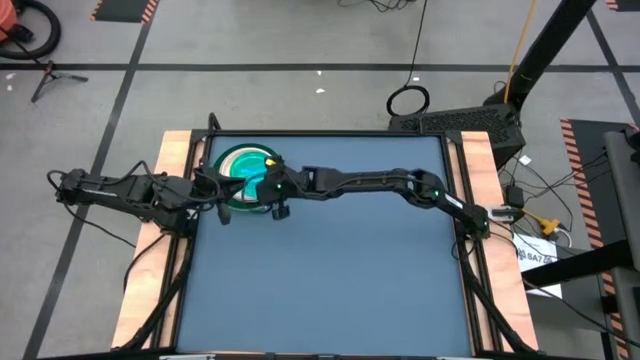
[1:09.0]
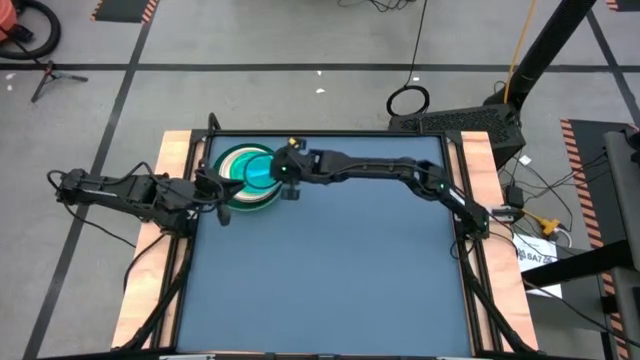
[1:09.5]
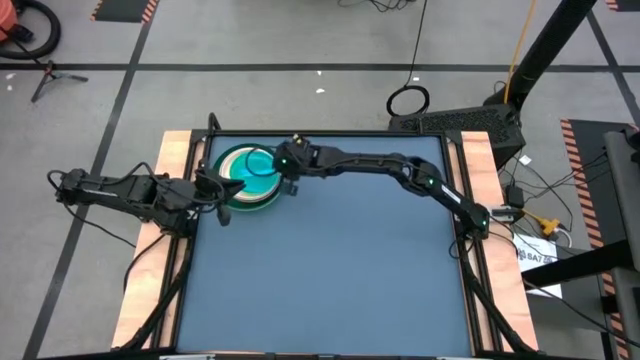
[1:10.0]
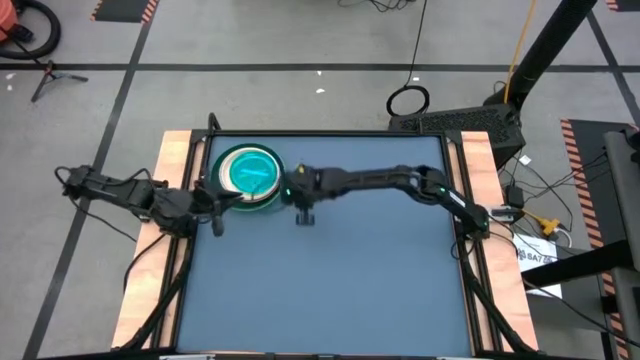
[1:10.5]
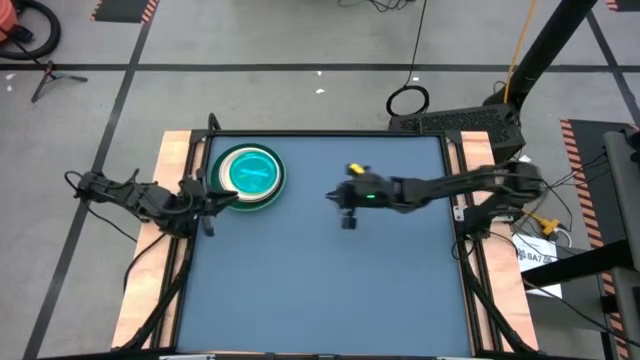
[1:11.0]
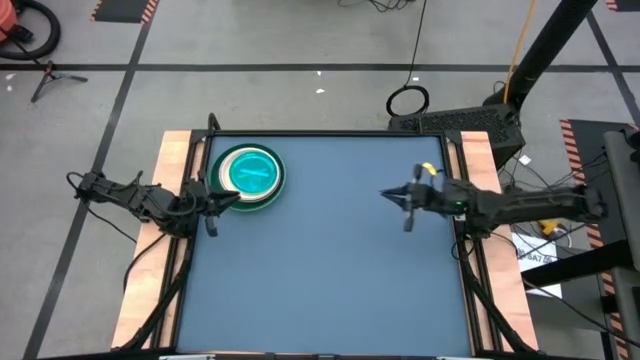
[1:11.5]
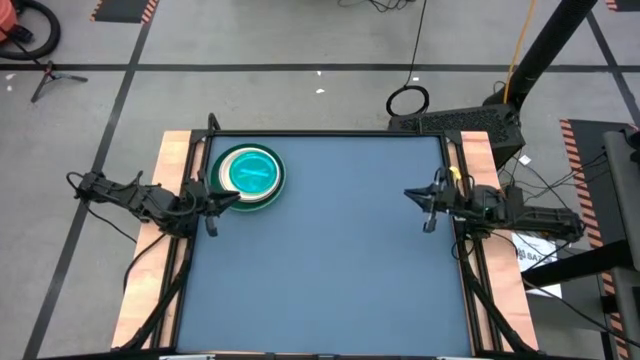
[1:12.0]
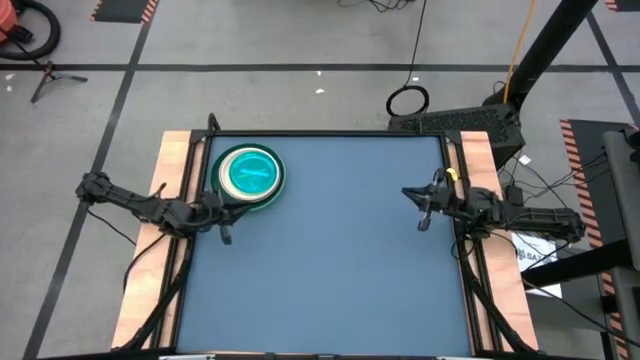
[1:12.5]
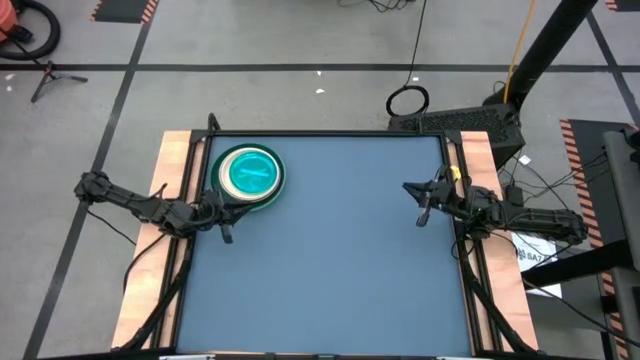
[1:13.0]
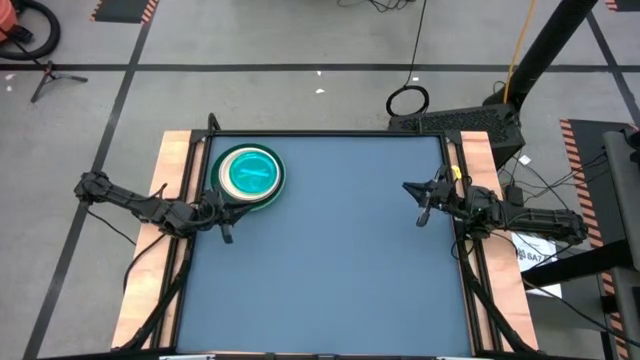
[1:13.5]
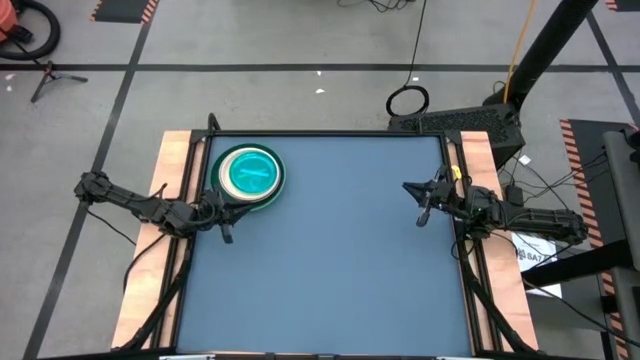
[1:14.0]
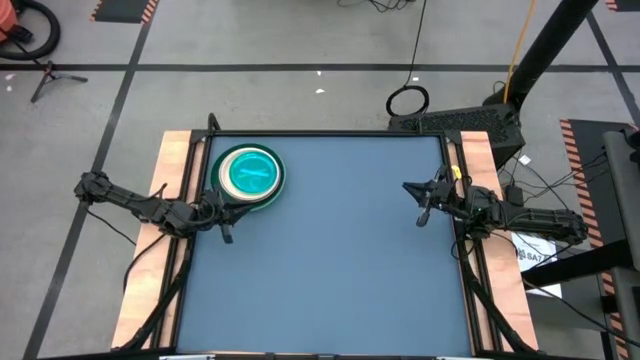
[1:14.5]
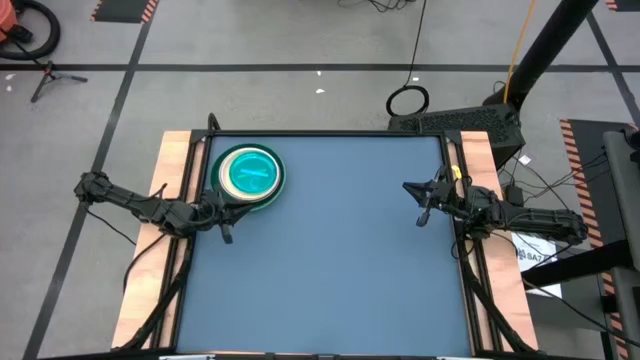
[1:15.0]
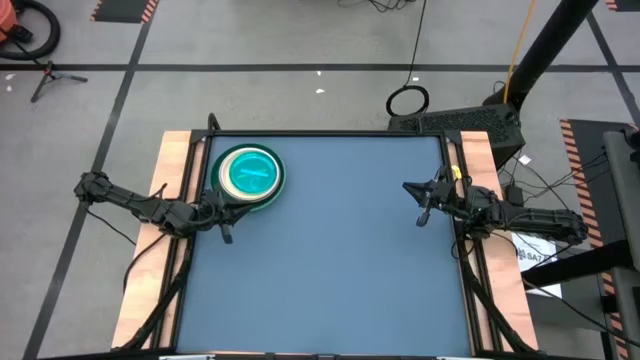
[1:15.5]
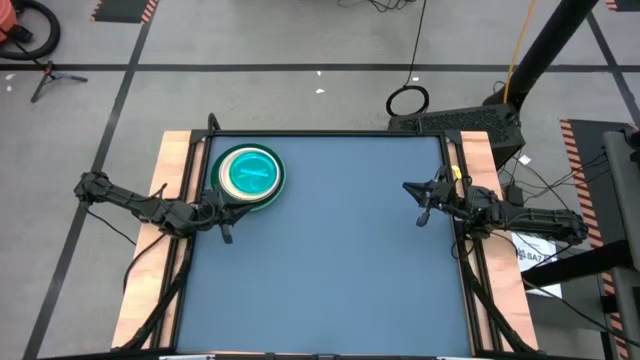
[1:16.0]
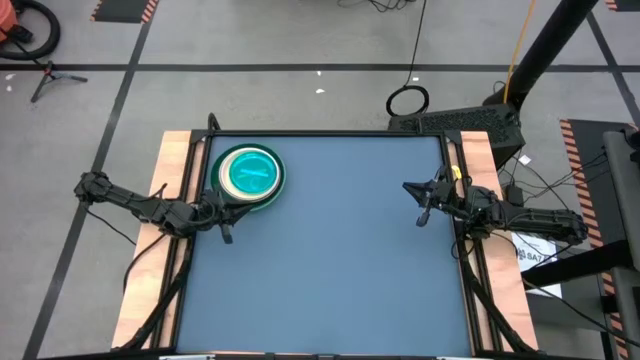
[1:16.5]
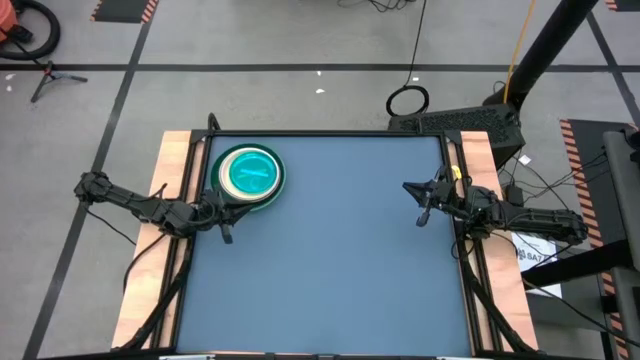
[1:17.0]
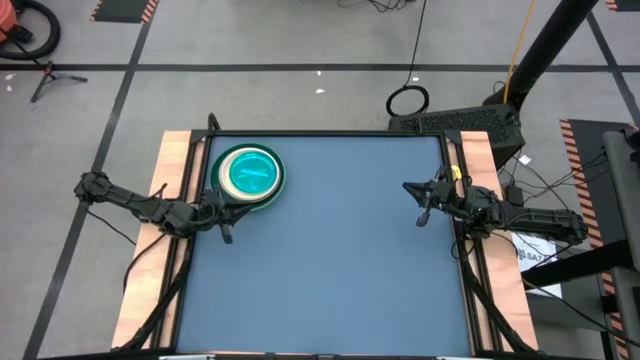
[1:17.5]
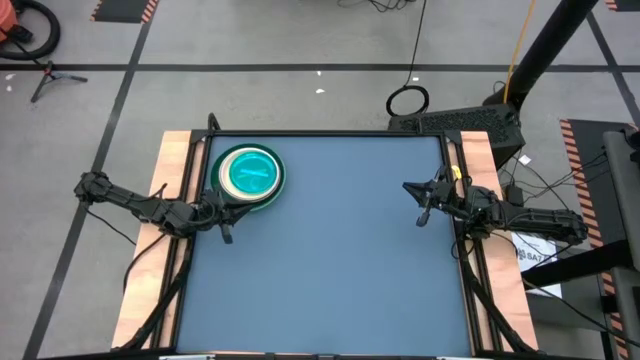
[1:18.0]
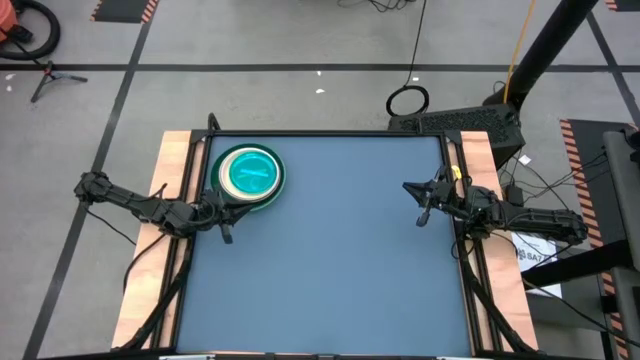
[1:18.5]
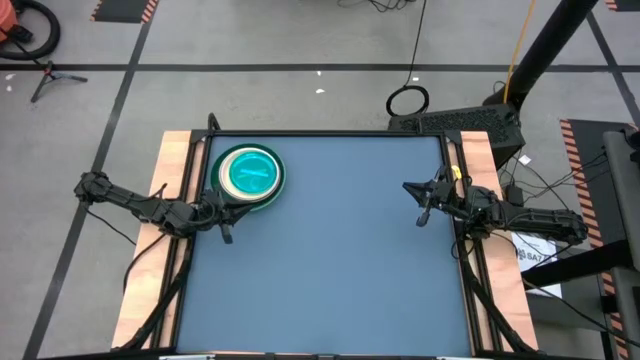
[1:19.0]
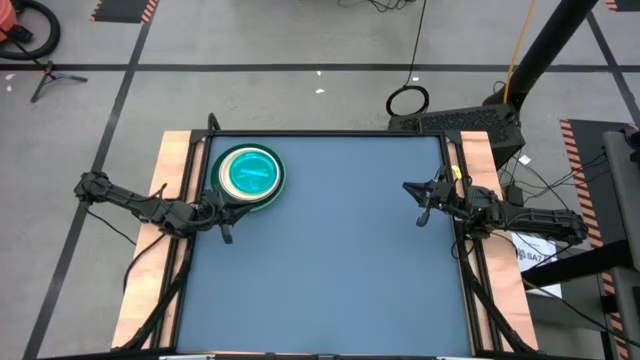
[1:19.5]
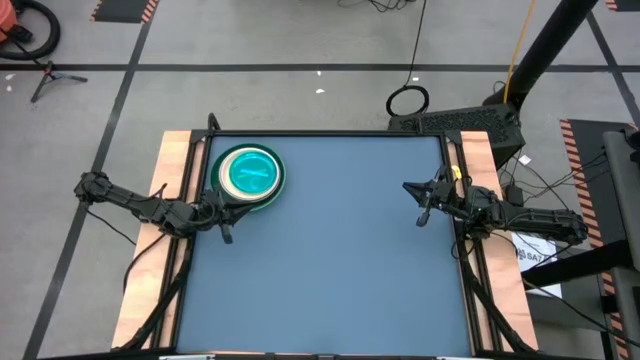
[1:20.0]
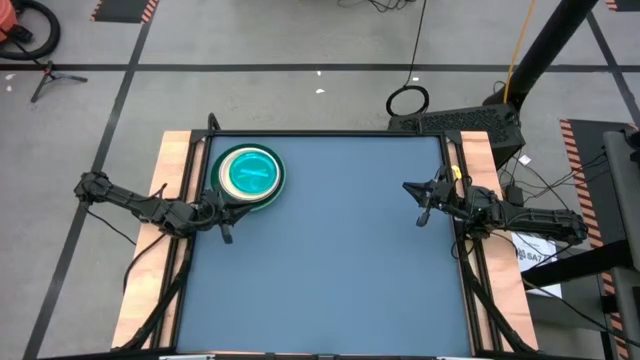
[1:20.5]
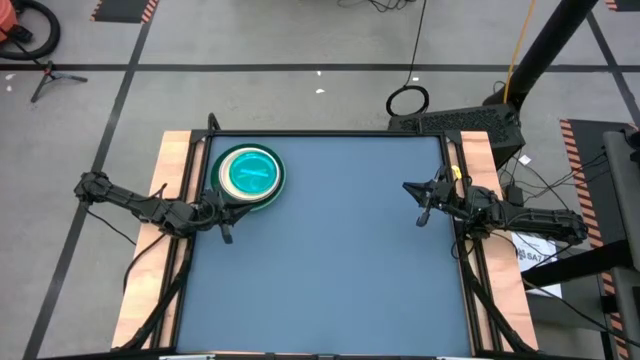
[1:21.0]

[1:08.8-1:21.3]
Task: Stack plastic plates
Return to Home Position

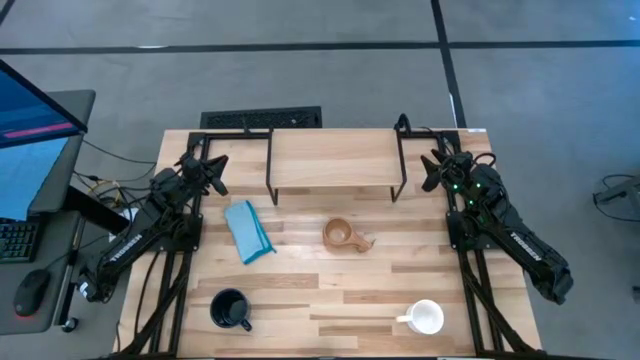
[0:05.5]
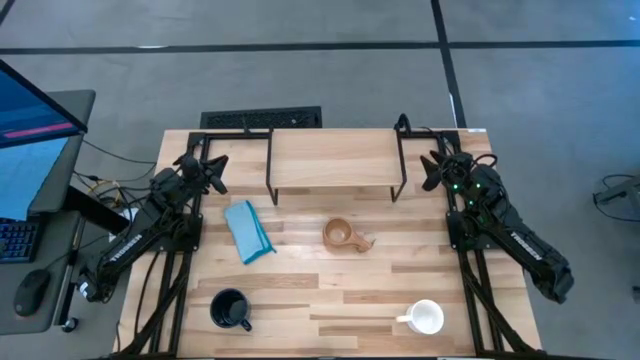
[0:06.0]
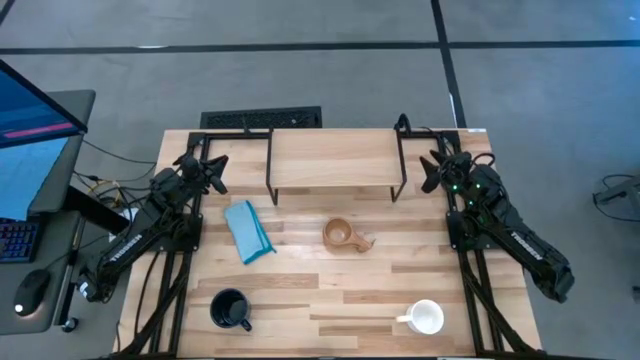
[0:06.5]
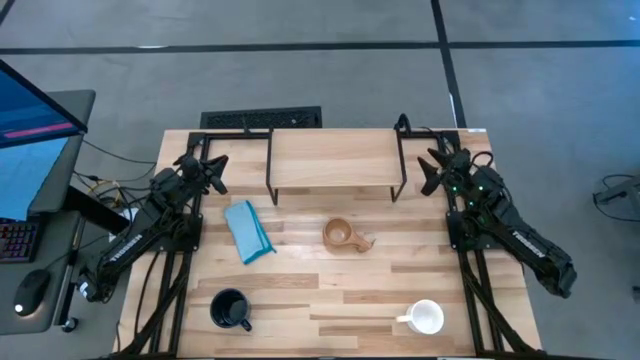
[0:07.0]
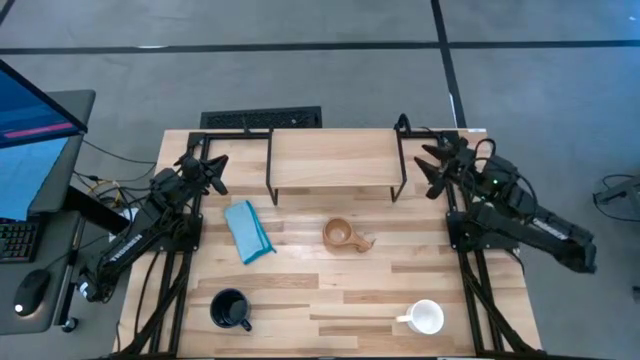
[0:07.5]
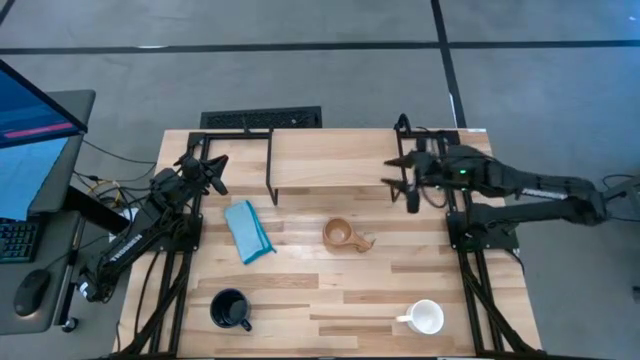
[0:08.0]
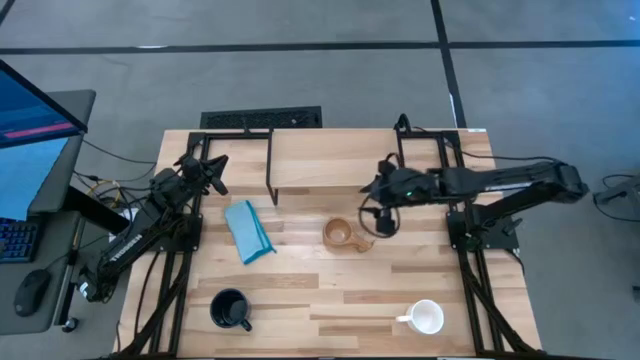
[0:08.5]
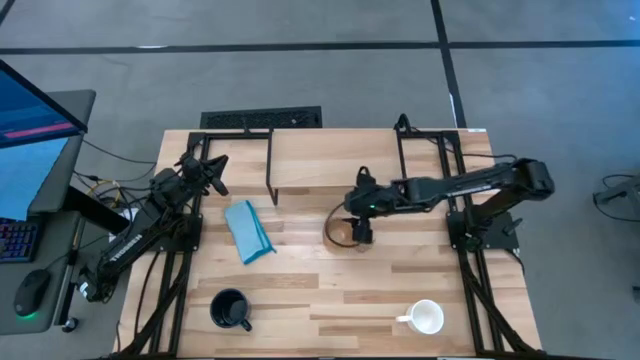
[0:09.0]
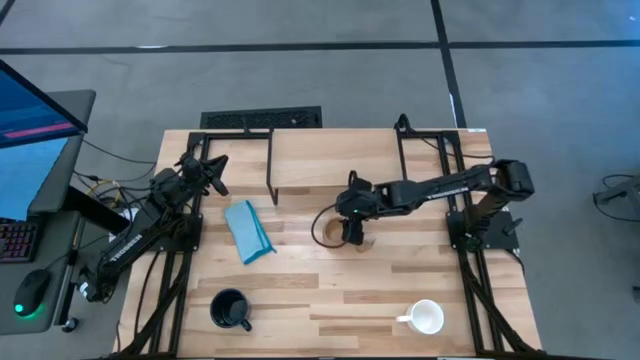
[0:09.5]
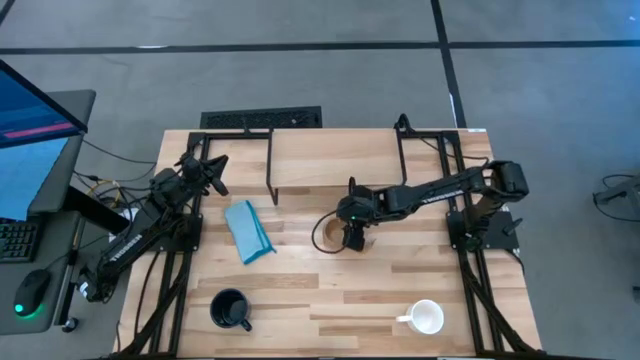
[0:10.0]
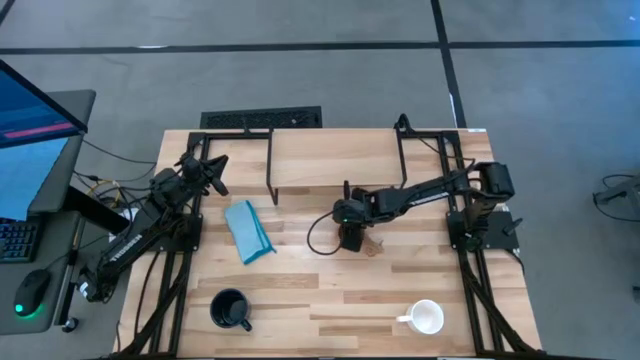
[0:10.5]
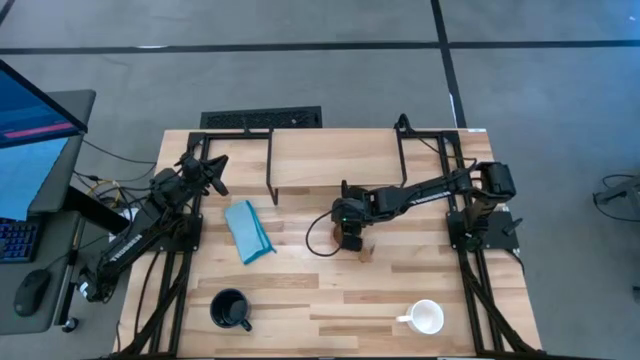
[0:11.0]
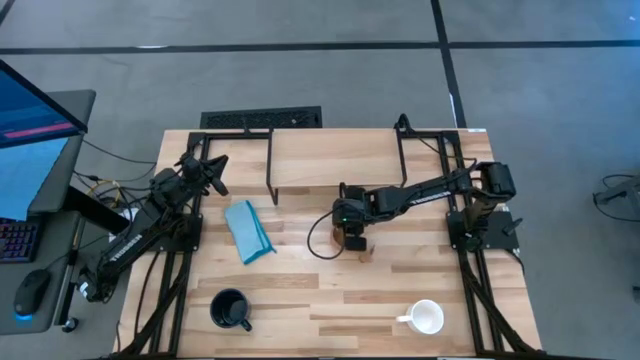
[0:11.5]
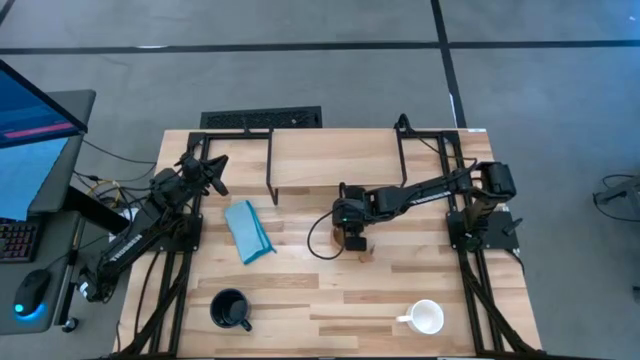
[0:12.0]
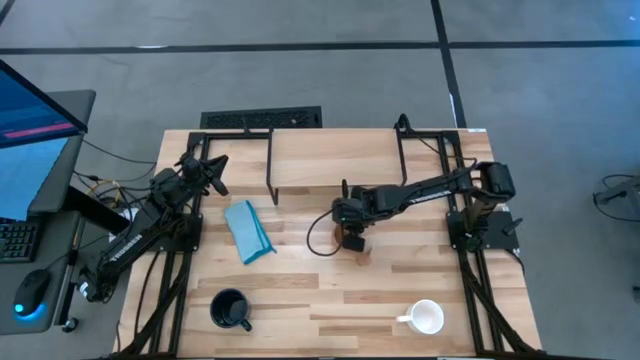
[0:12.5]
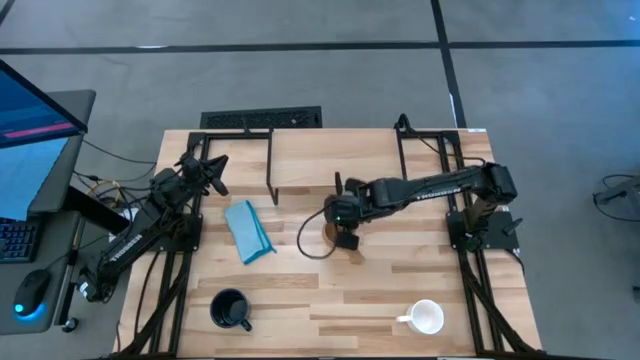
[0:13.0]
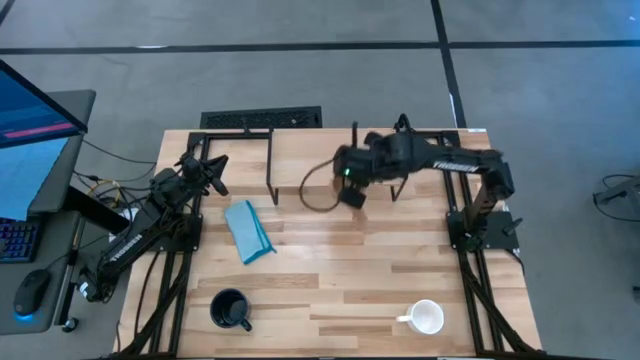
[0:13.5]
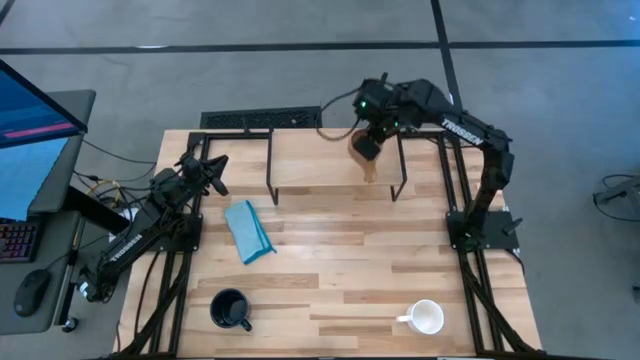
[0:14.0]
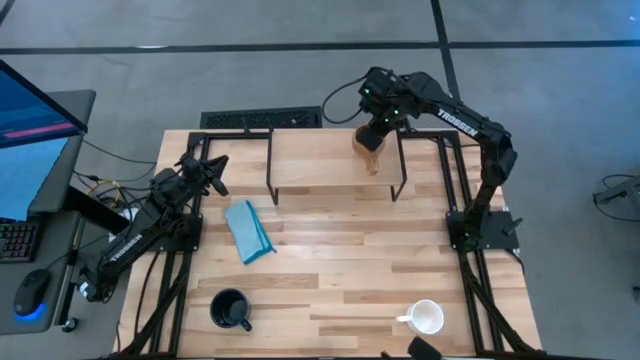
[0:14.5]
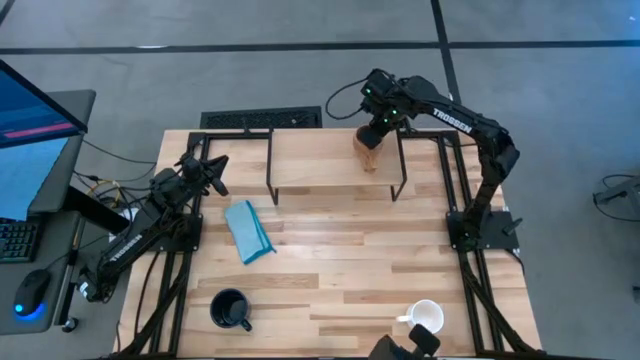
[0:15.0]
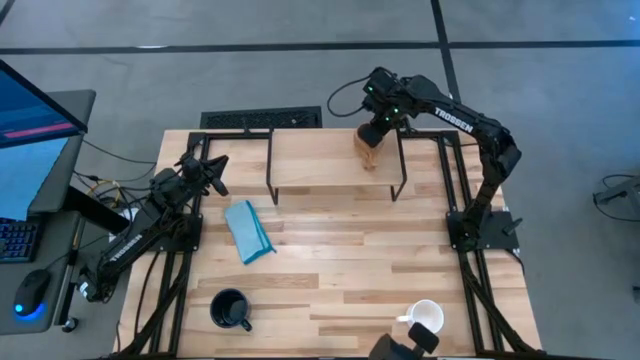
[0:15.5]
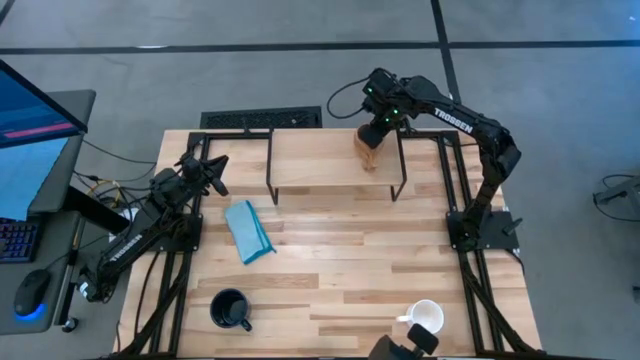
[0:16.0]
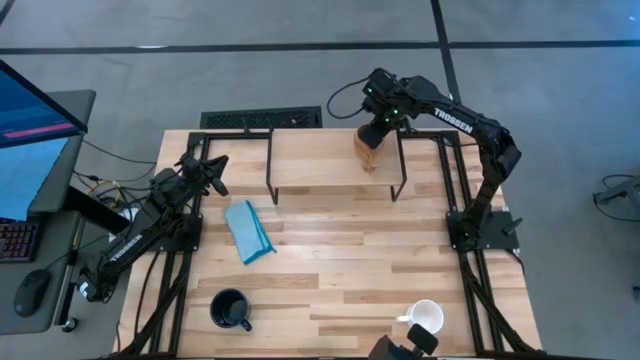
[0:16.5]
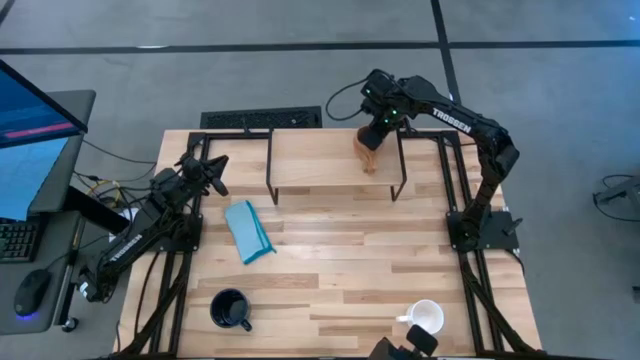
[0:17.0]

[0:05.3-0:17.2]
Task: Stack small to large cups/mugs on shelf
Put the brown mug on the shelf
